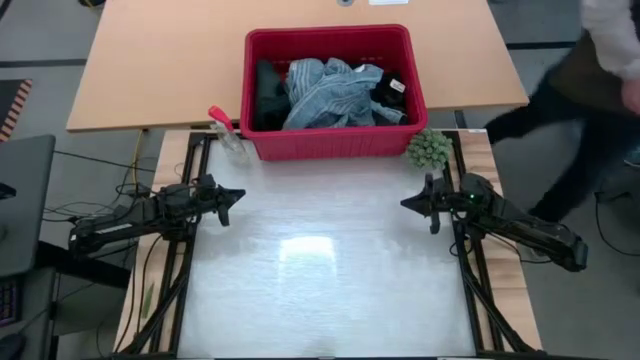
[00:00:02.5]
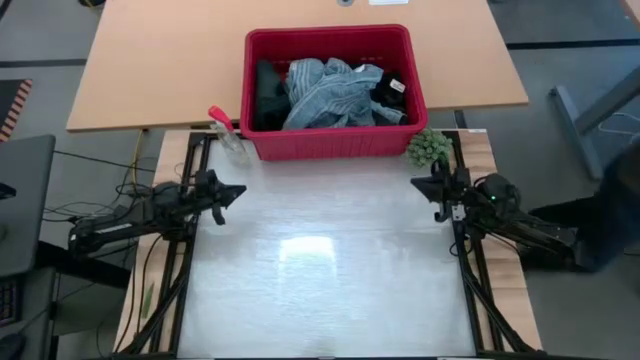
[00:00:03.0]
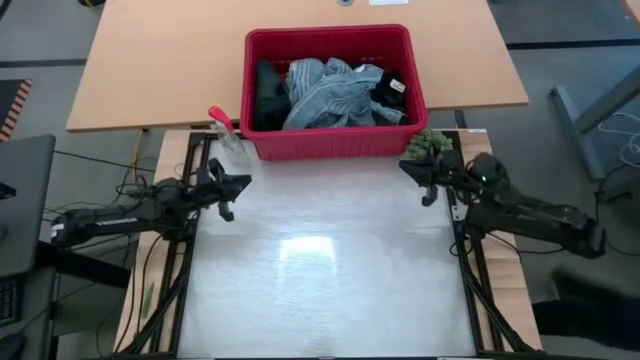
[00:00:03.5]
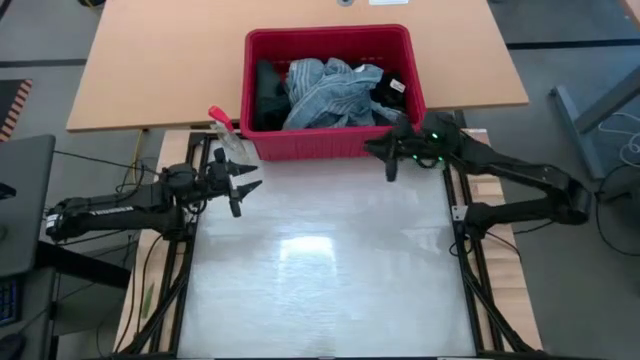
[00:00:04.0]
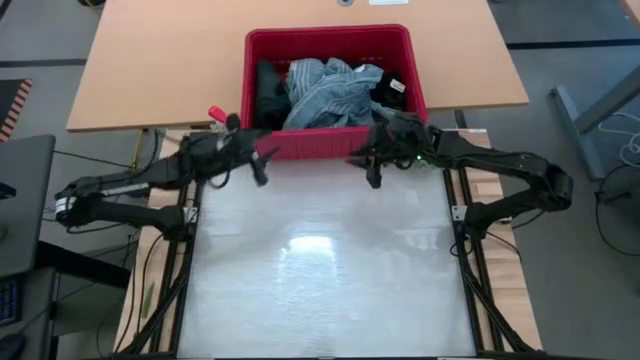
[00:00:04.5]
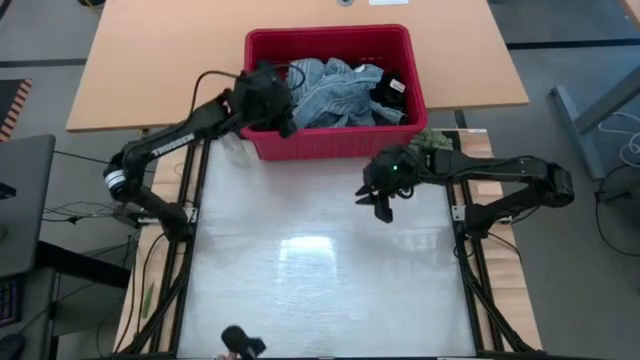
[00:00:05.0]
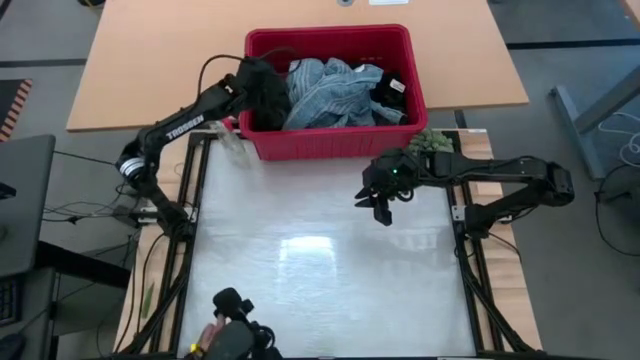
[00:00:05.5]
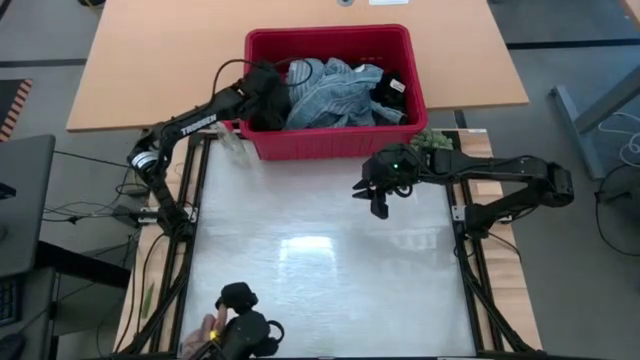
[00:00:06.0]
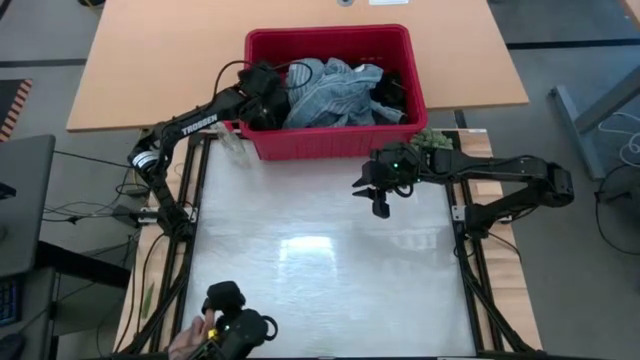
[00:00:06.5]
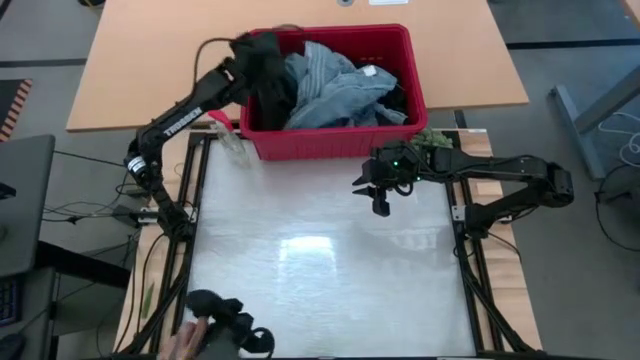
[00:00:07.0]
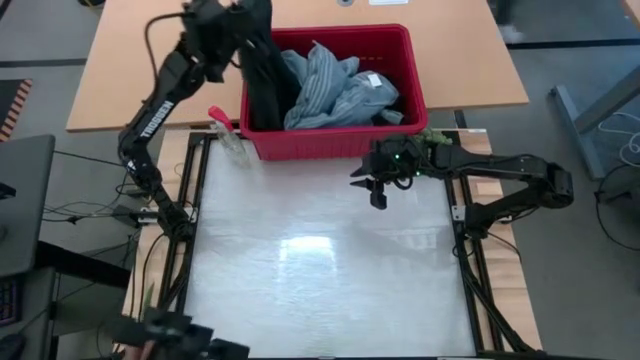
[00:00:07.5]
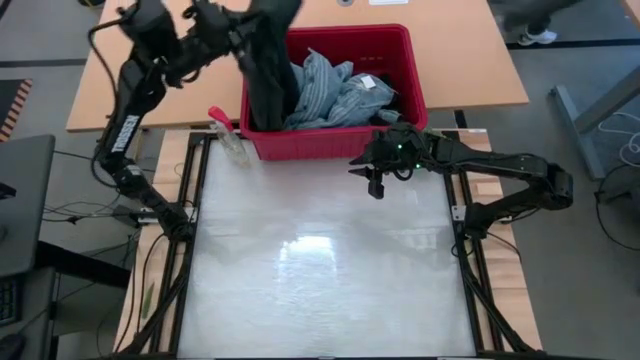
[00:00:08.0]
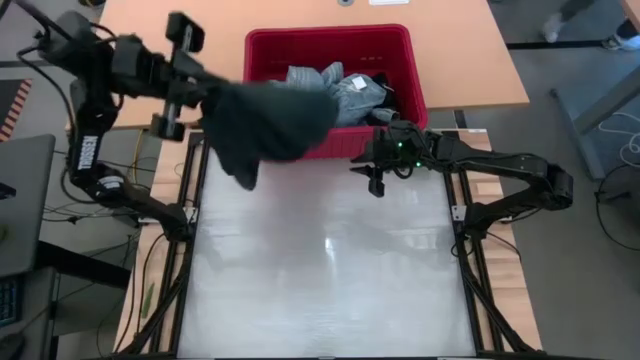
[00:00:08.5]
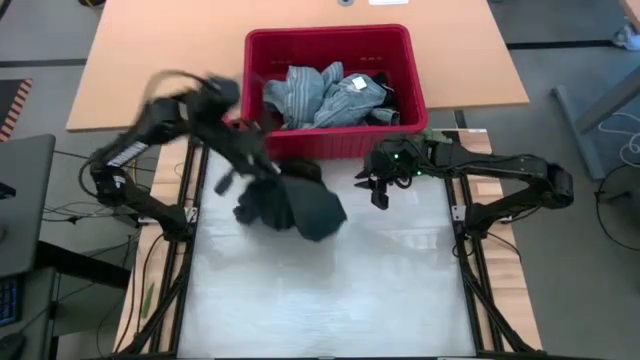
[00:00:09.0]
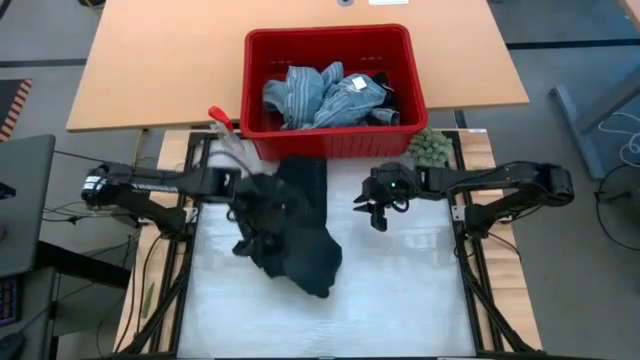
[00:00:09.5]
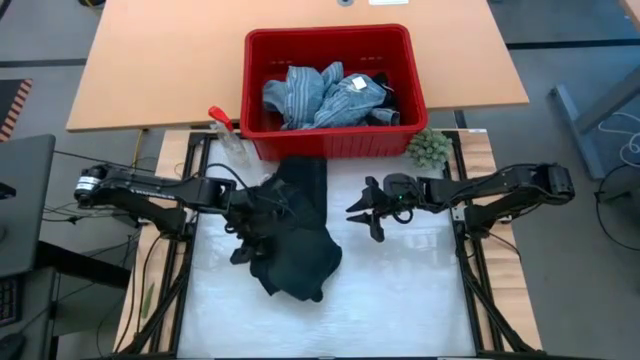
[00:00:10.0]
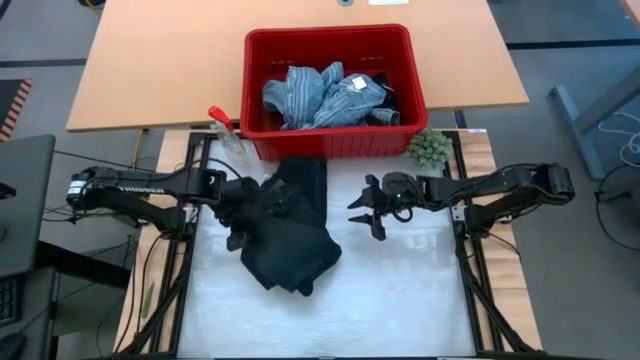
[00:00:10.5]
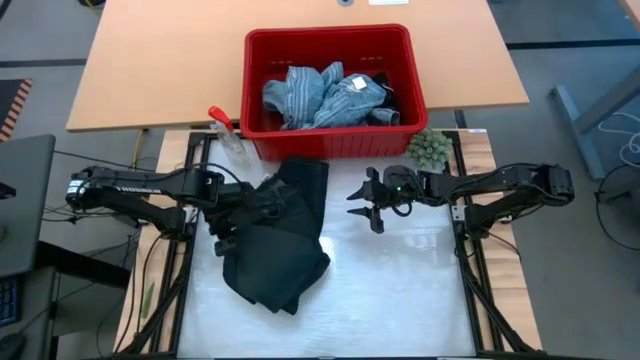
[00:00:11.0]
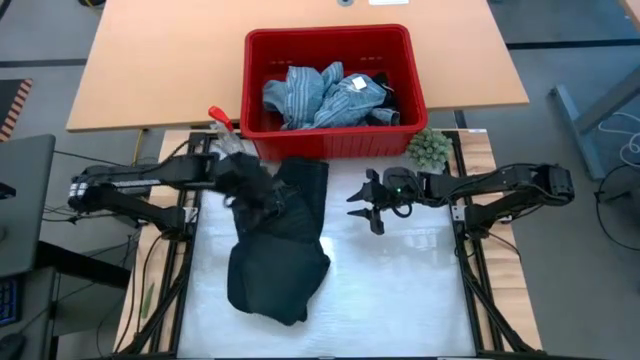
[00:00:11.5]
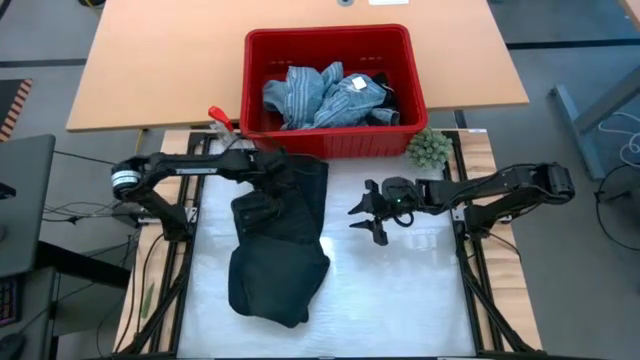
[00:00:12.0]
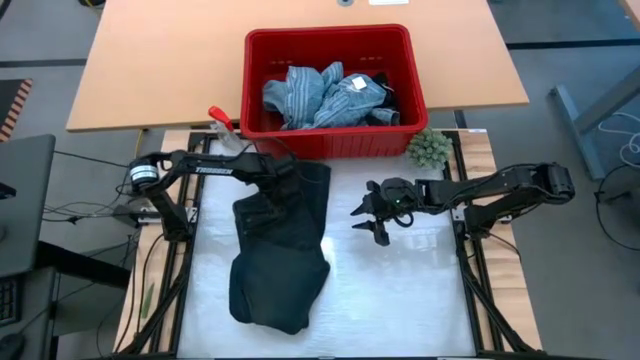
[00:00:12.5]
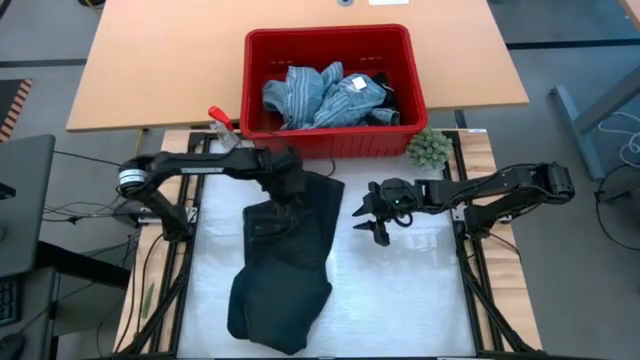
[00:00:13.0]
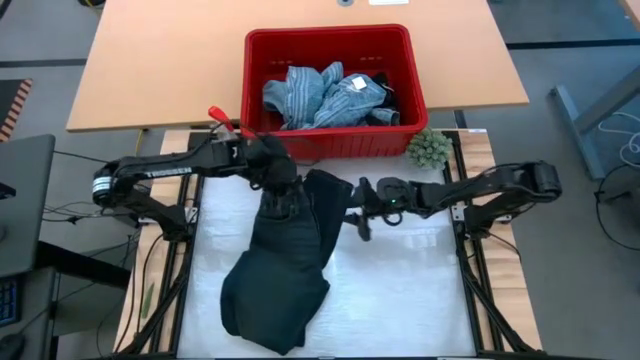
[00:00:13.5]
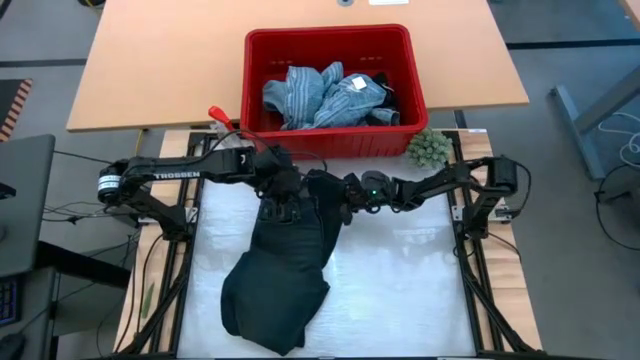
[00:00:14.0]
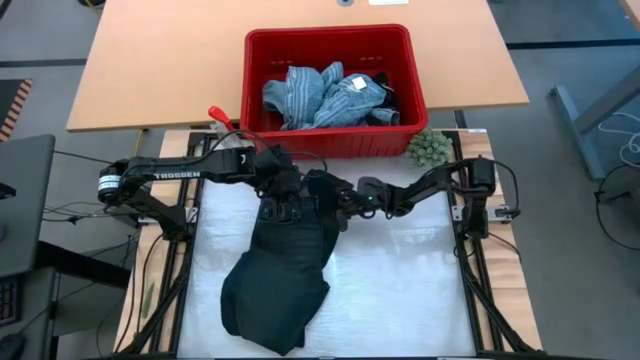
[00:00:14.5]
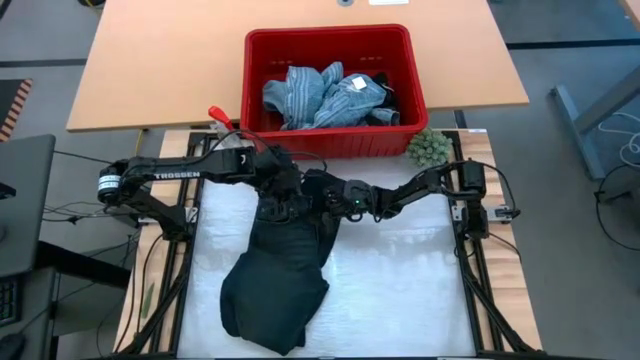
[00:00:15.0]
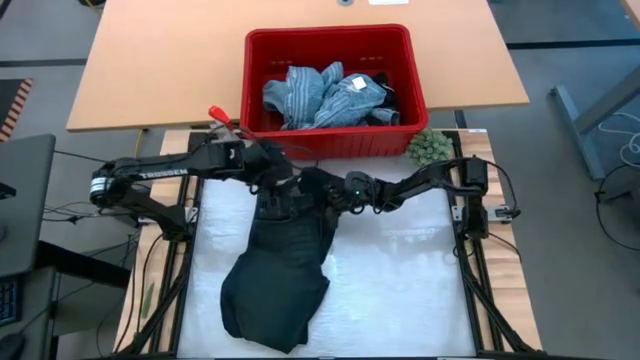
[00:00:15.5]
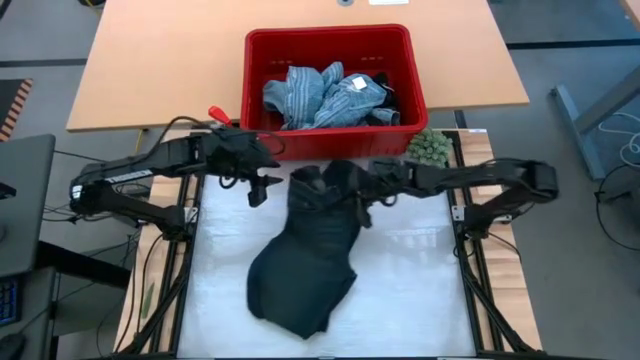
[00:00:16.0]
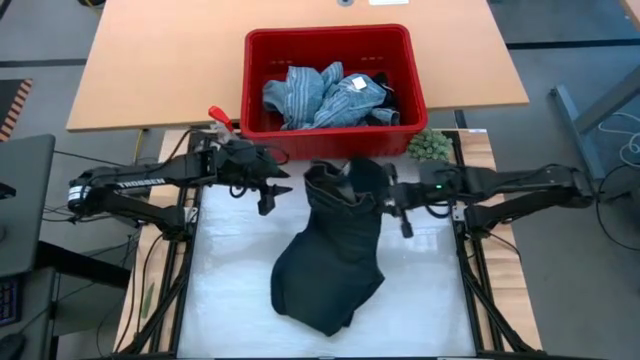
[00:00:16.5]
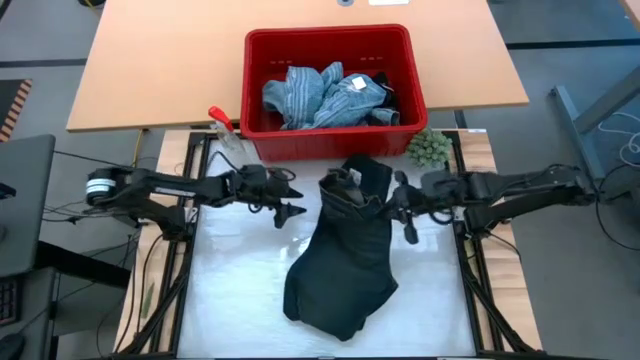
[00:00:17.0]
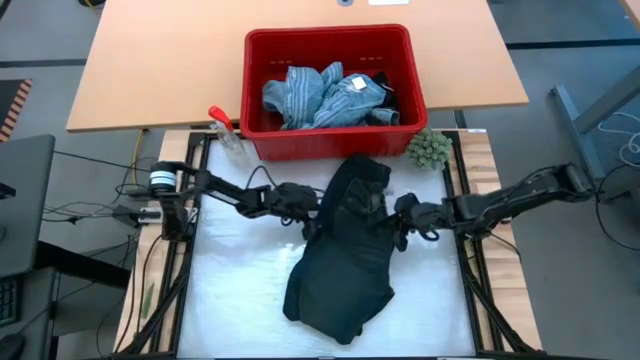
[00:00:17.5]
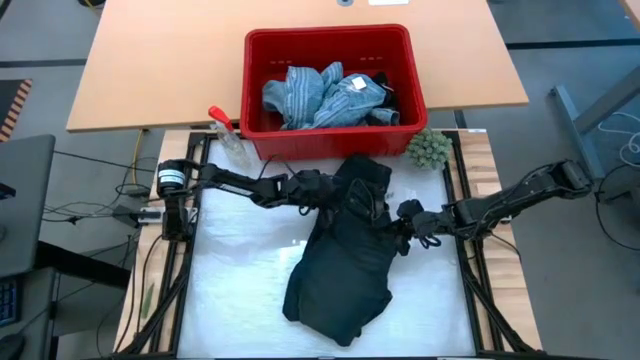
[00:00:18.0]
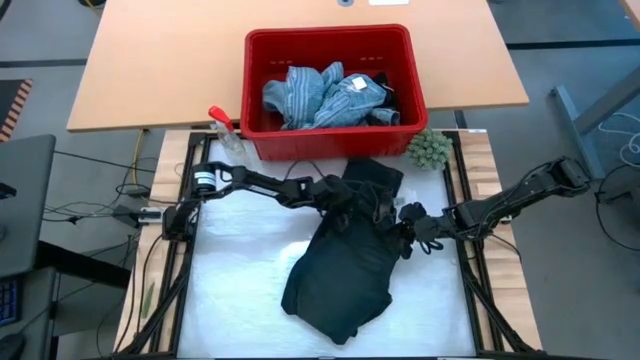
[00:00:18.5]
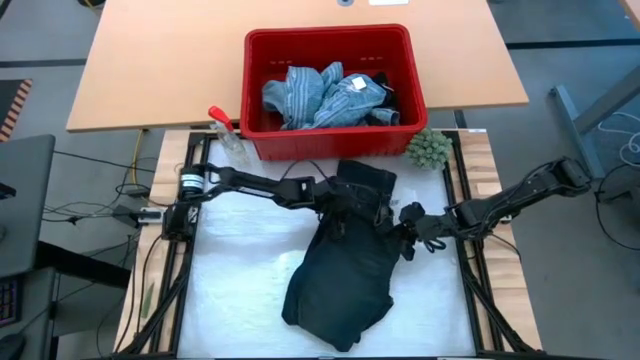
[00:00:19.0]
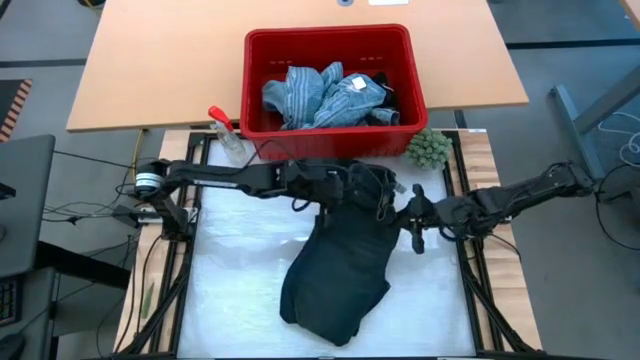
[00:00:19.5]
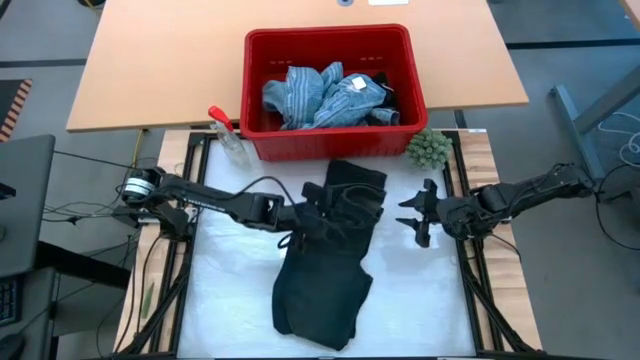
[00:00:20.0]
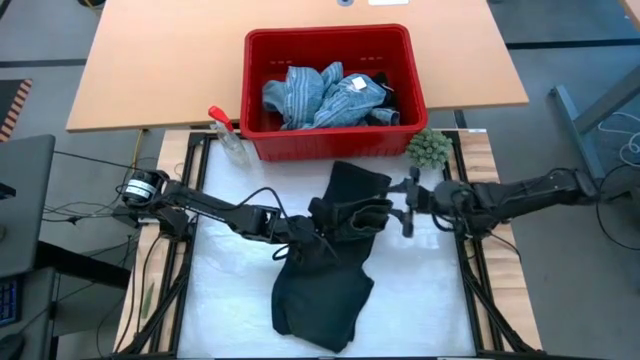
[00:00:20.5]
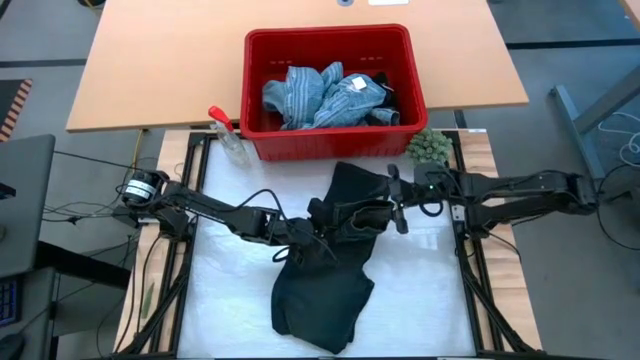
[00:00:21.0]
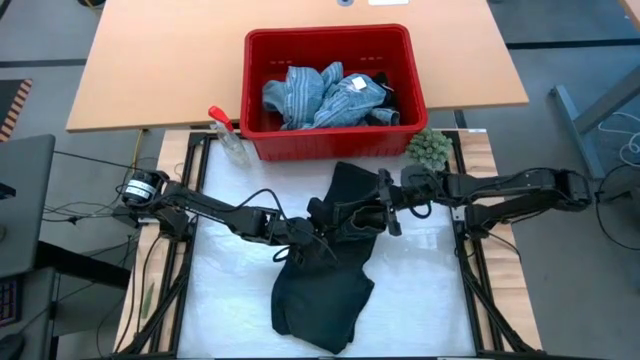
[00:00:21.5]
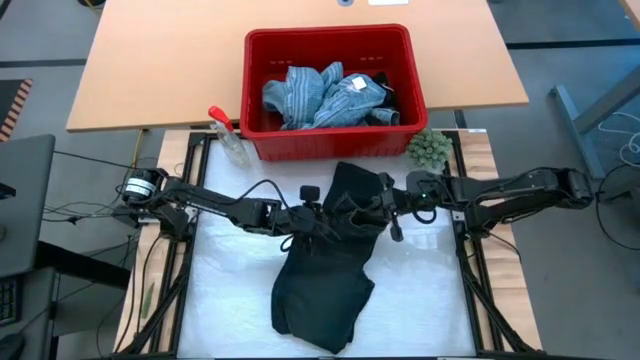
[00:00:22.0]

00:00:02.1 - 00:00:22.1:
Task: Fold Laundry from Bin
Fold the dark blue pants
